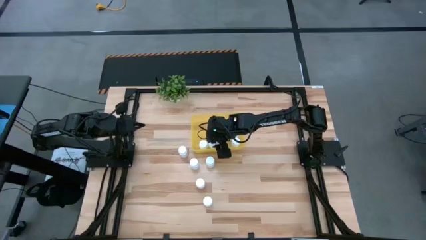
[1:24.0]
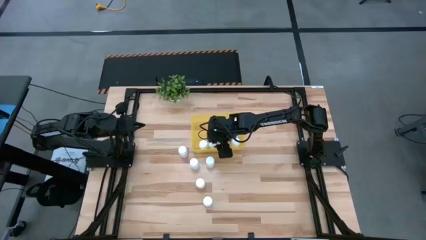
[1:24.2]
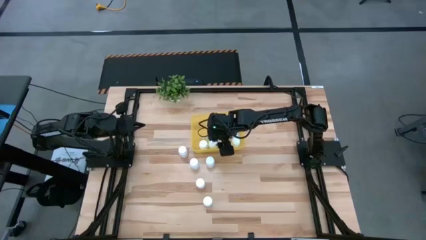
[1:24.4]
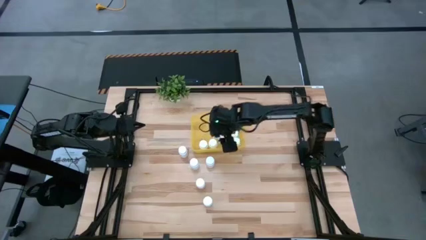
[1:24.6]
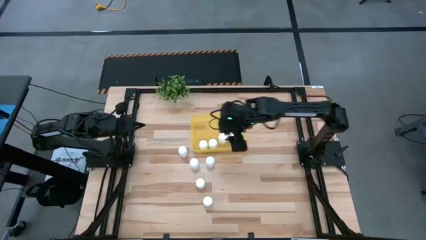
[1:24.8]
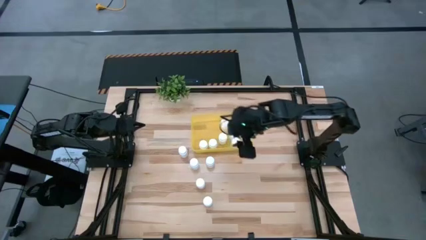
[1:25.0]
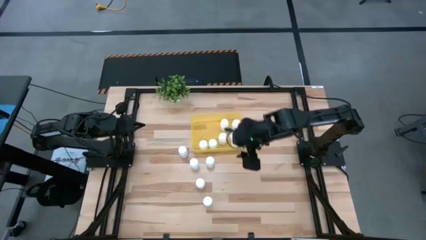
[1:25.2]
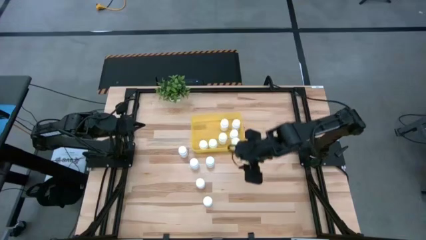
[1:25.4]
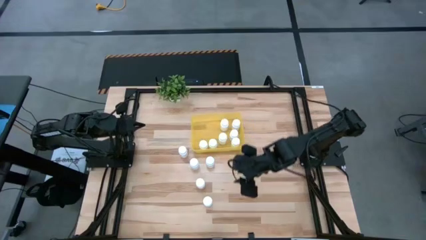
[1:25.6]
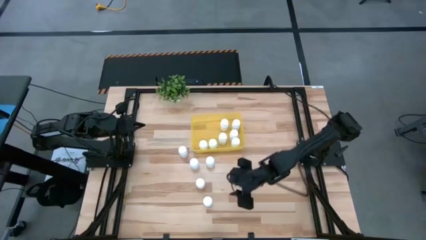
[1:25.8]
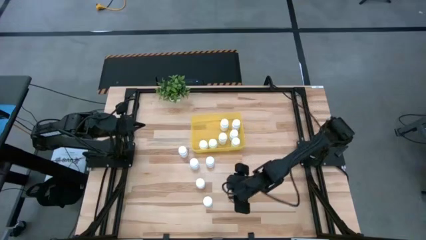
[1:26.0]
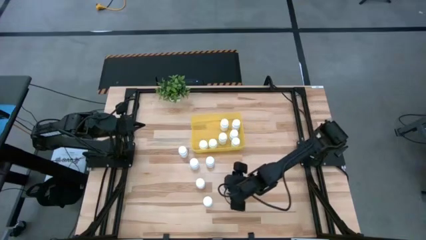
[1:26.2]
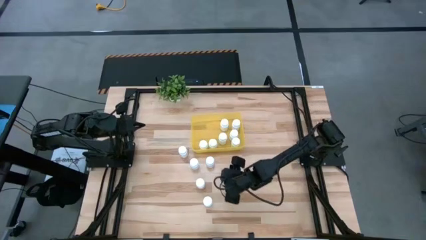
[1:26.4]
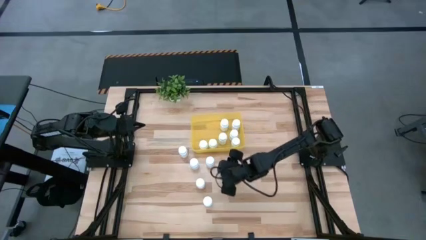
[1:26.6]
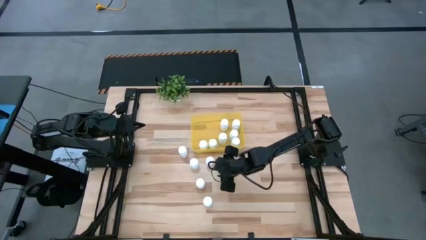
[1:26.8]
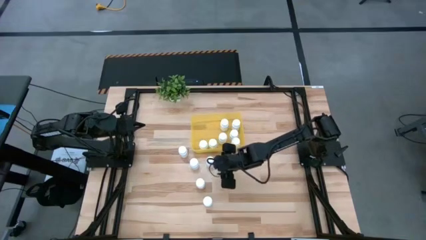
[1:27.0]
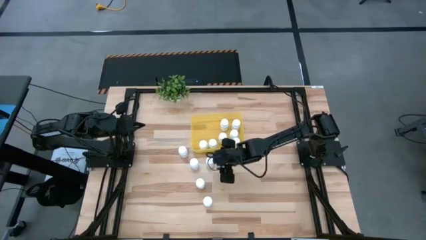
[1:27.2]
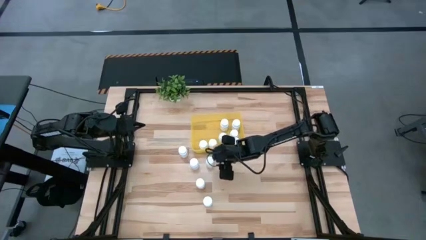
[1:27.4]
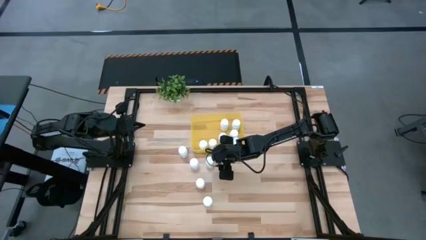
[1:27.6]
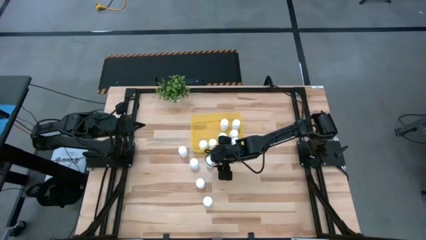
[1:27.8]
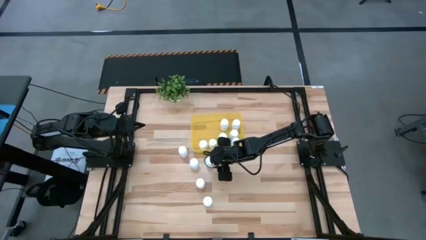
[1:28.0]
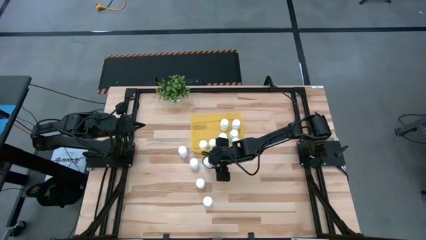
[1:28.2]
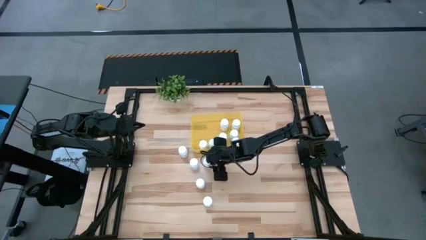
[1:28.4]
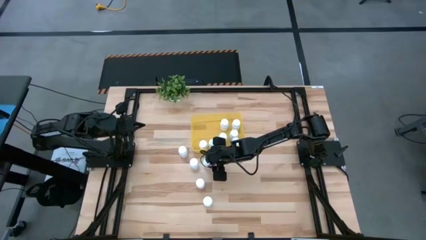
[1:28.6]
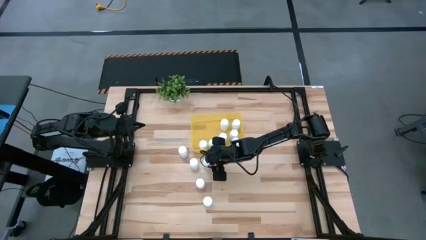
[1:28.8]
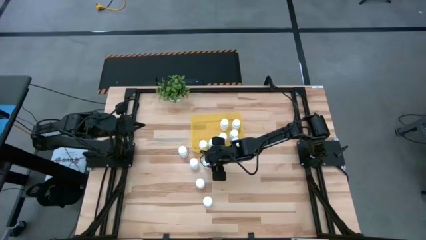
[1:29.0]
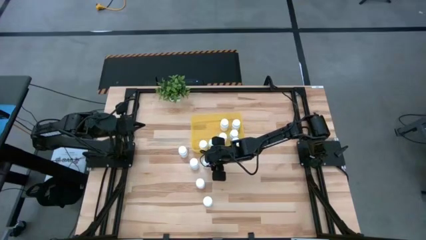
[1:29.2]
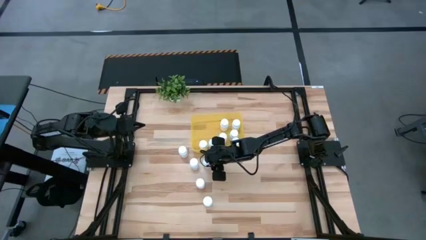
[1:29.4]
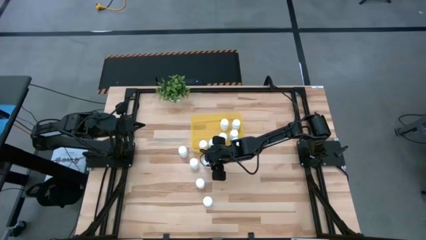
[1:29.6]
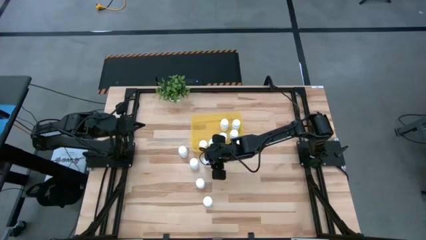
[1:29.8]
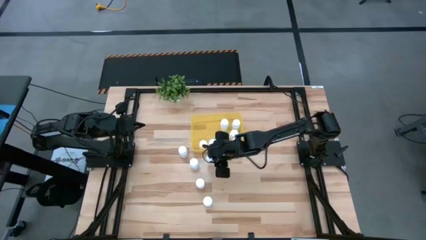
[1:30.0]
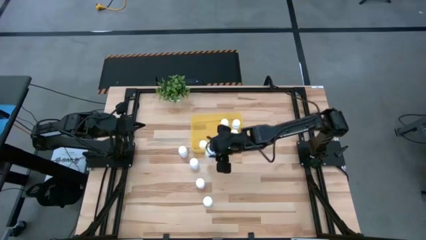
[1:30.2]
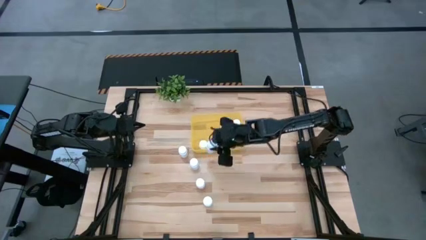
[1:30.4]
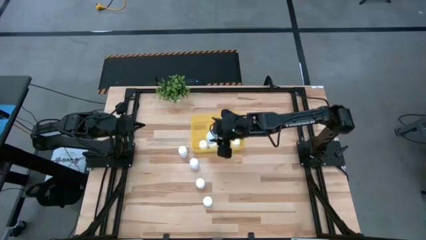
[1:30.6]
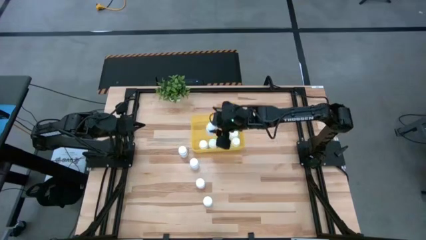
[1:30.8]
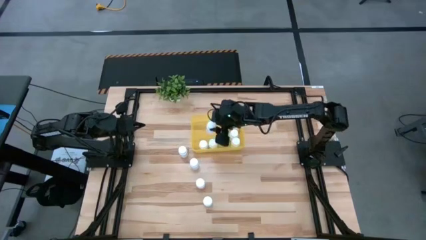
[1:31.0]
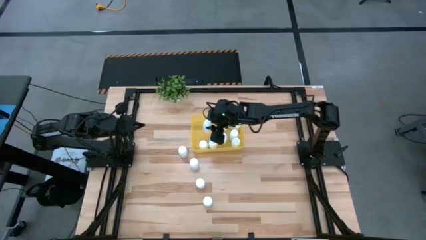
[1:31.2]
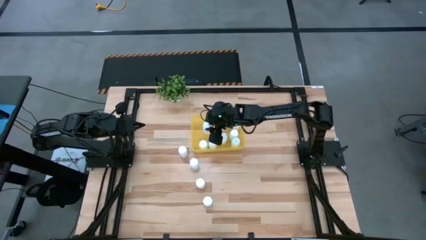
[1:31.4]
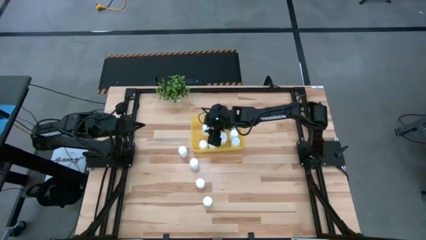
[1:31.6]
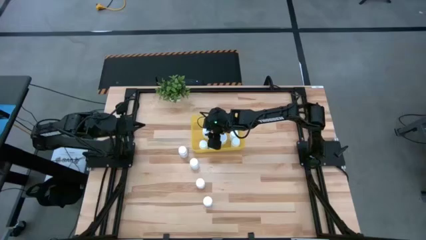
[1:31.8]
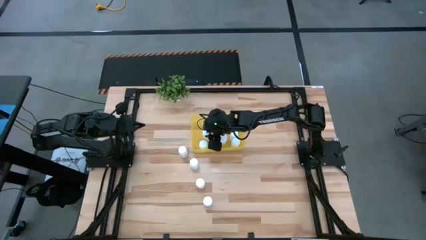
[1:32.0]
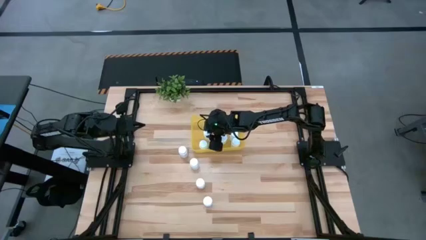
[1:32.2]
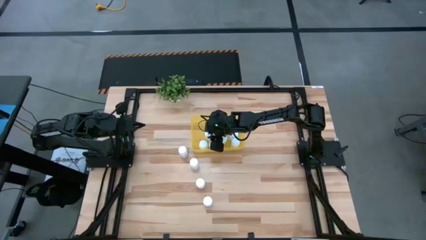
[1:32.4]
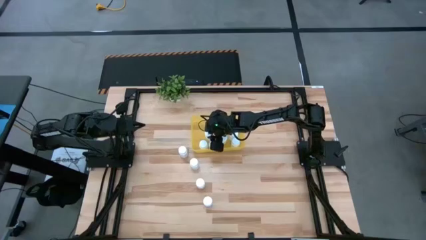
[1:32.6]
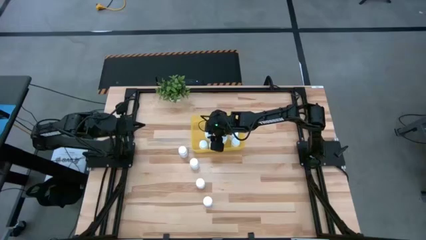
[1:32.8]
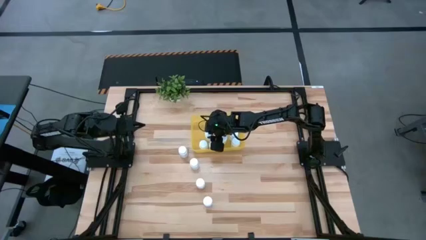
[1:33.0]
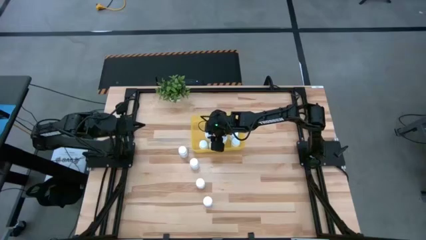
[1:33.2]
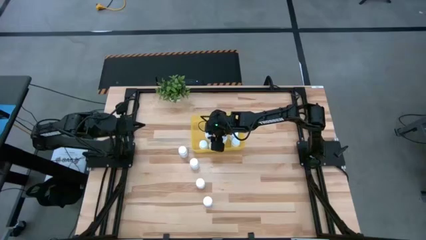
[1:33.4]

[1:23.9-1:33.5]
Task: Pick and place pill bottles into a basket
Put the white medicine bottle into the yellow bin
